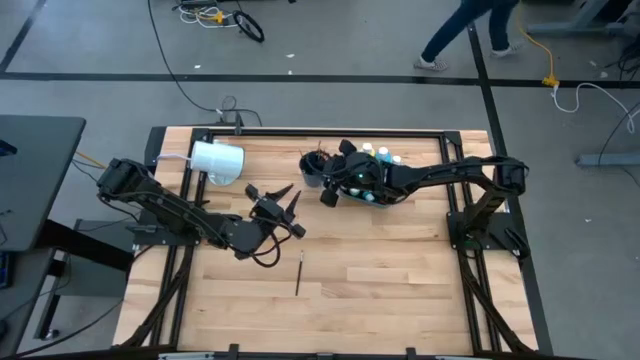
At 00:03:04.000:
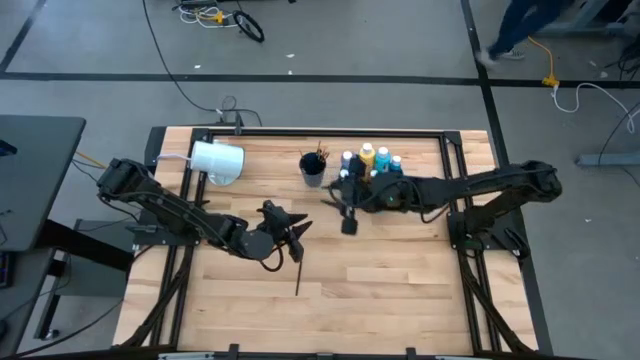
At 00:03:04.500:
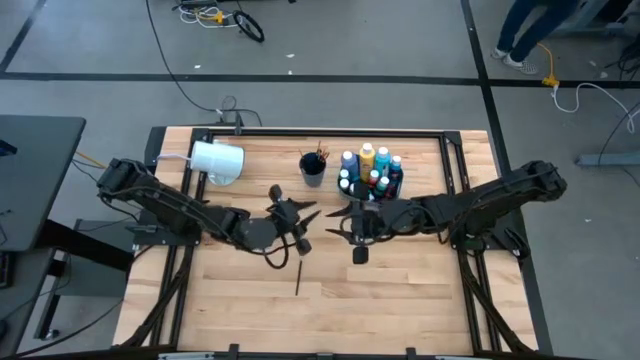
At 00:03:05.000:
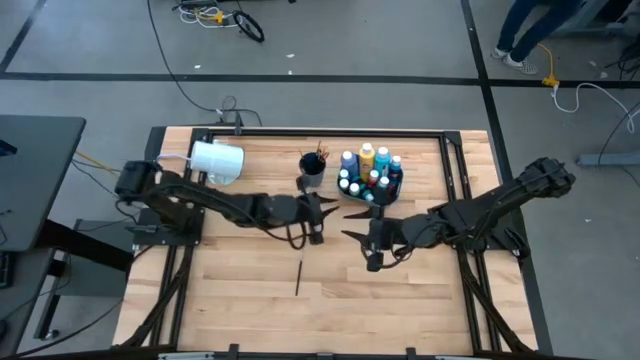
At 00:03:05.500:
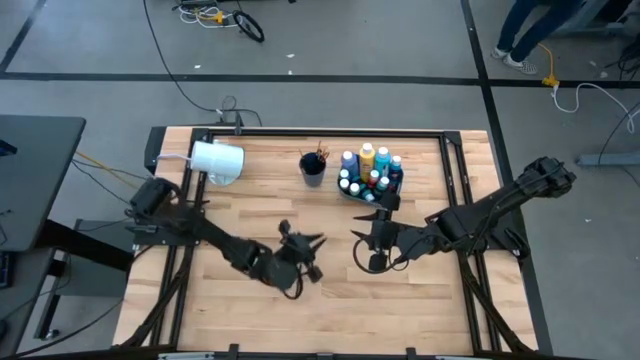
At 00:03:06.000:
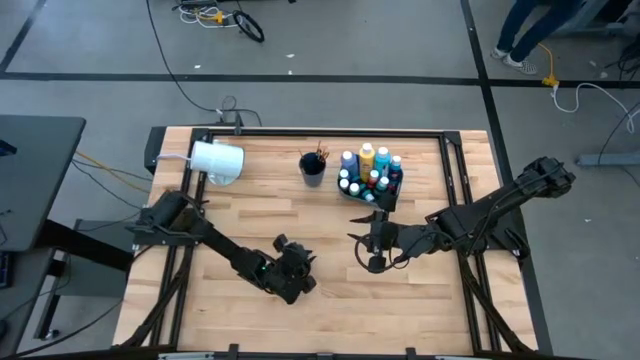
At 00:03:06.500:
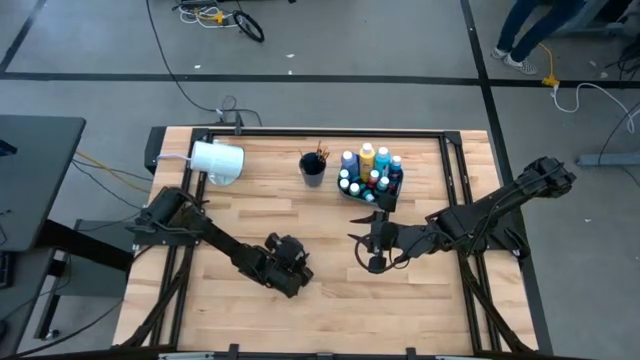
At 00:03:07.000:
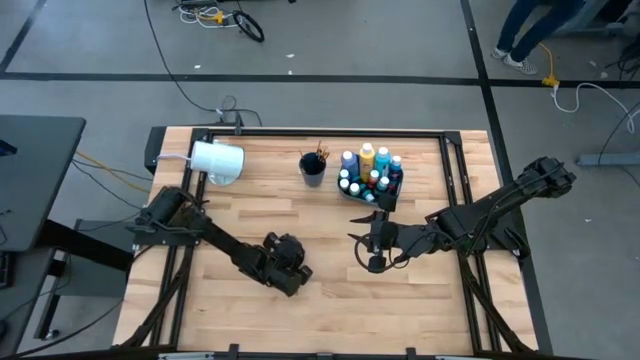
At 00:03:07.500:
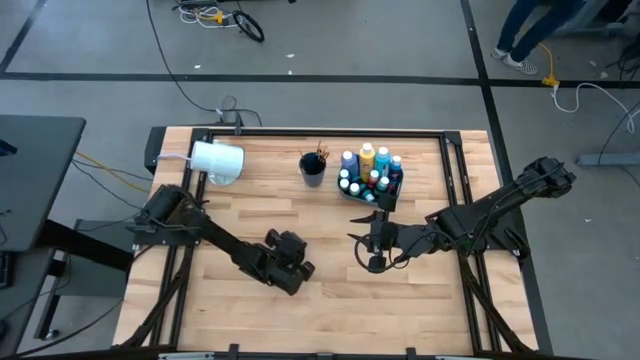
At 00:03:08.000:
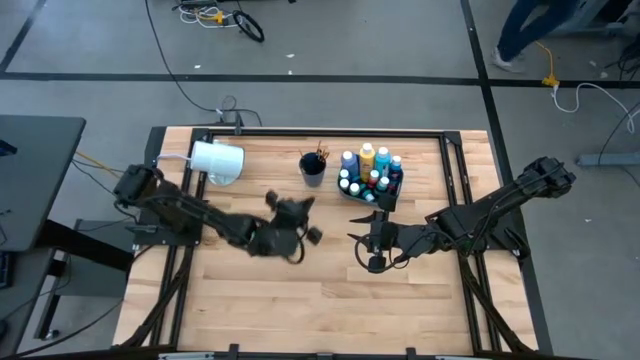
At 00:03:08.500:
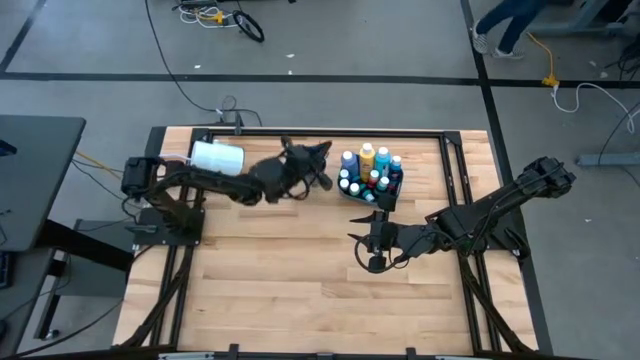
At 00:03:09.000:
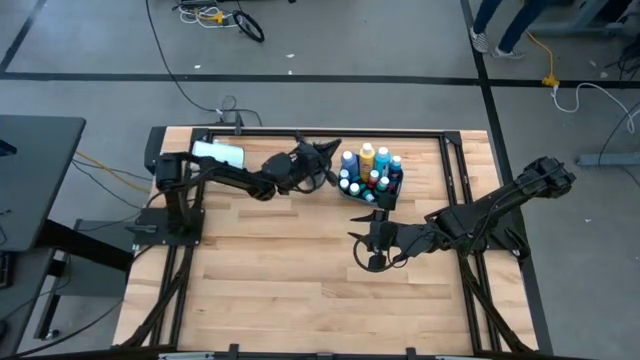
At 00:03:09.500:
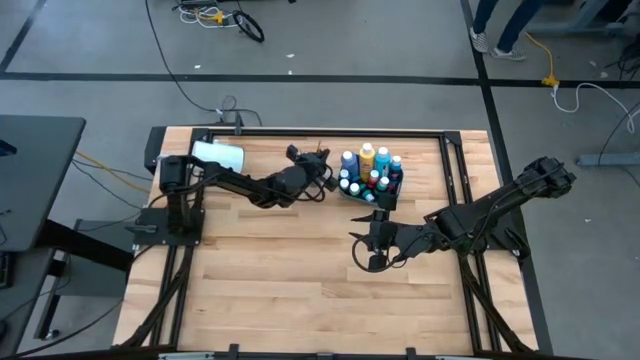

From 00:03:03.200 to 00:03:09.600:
Task: Pick & Place Paint Supplies
Put the silver paint brush into the blue cup

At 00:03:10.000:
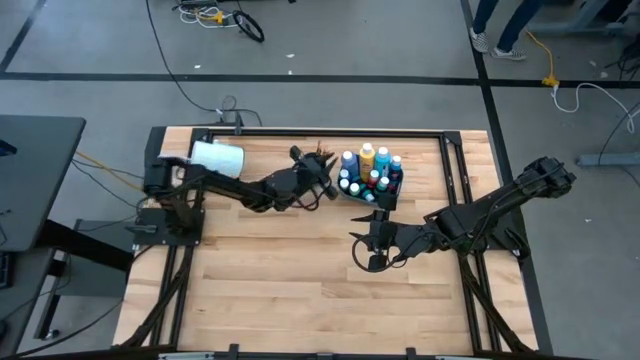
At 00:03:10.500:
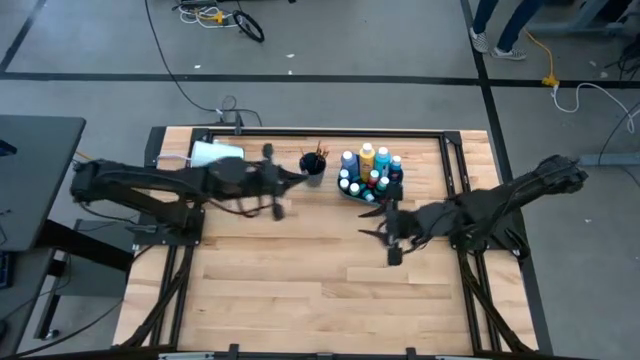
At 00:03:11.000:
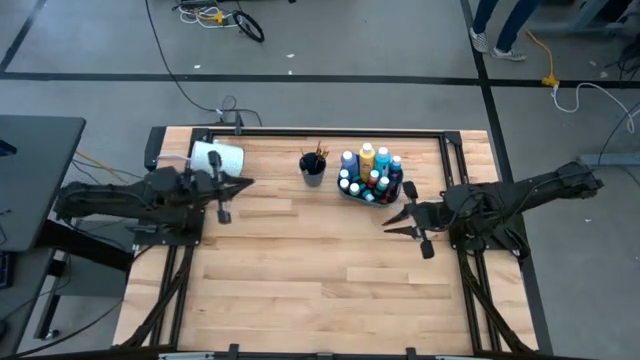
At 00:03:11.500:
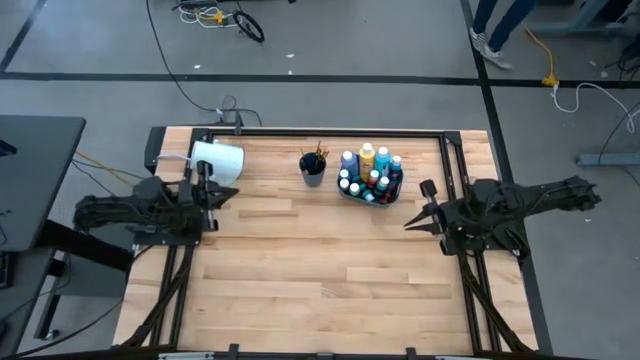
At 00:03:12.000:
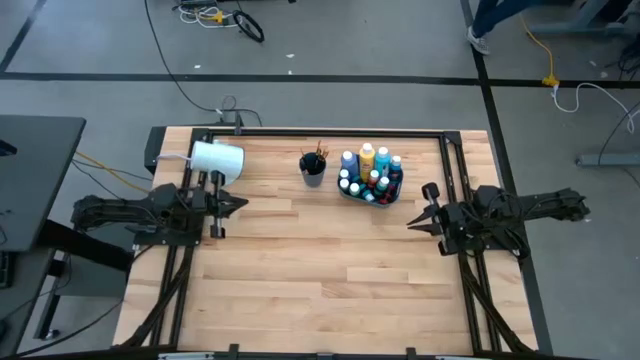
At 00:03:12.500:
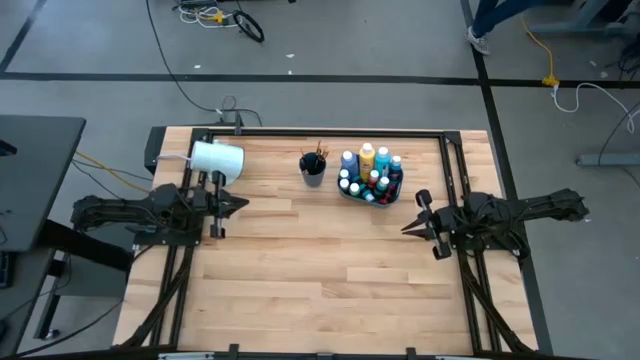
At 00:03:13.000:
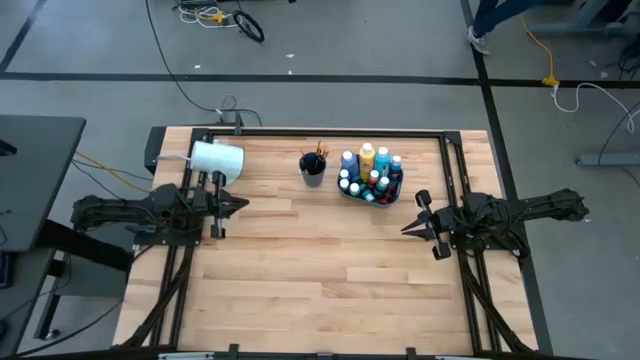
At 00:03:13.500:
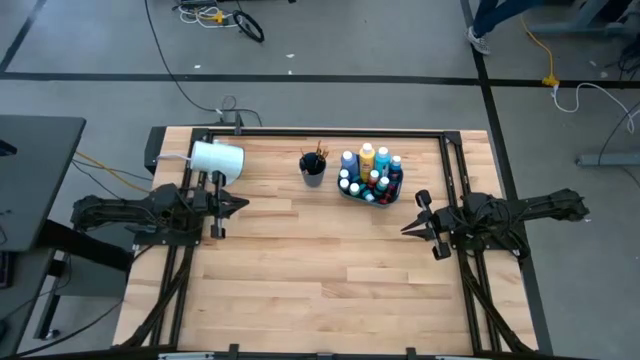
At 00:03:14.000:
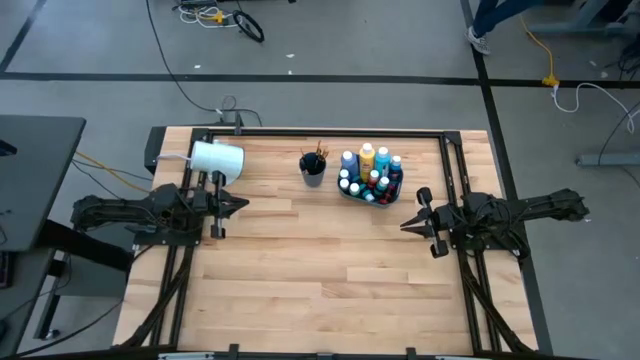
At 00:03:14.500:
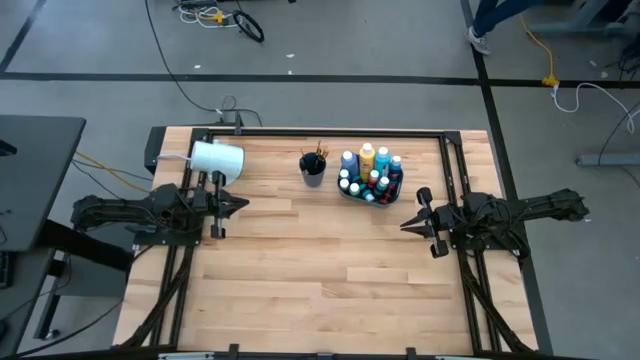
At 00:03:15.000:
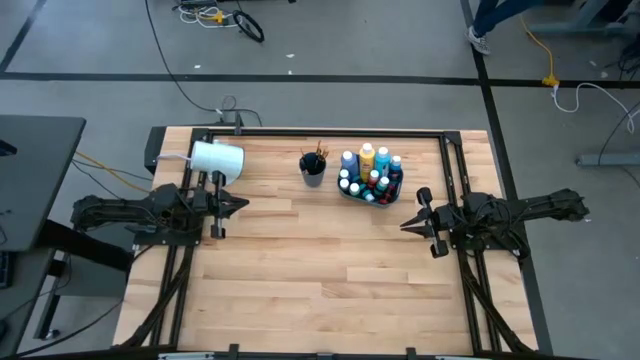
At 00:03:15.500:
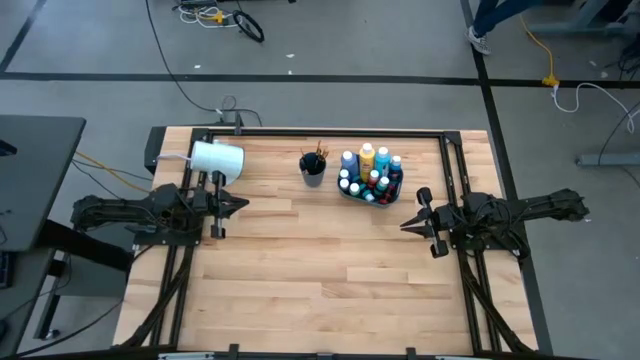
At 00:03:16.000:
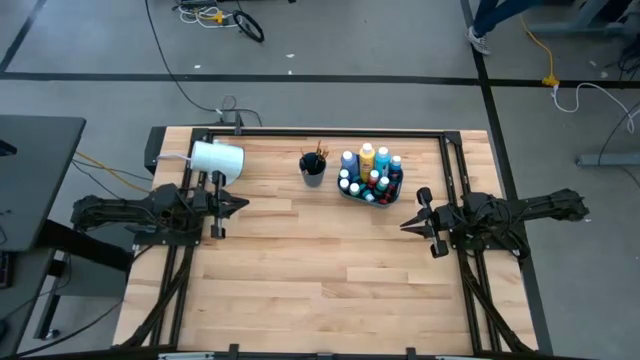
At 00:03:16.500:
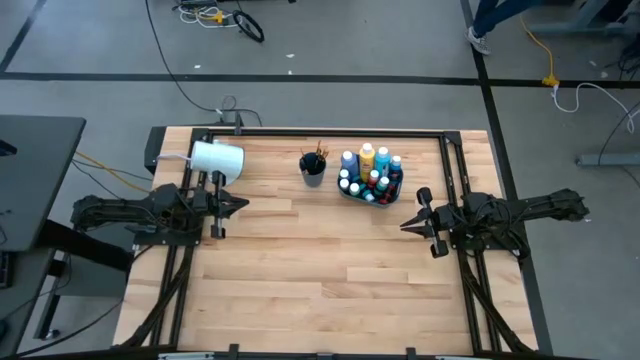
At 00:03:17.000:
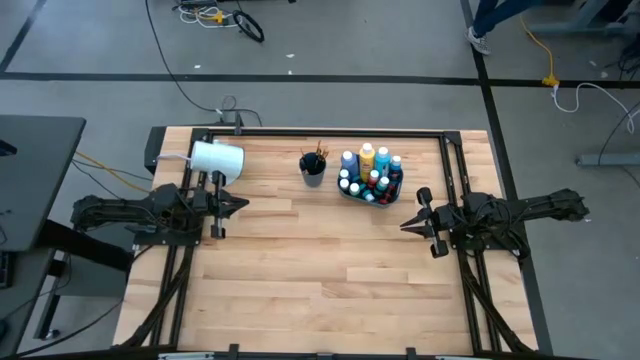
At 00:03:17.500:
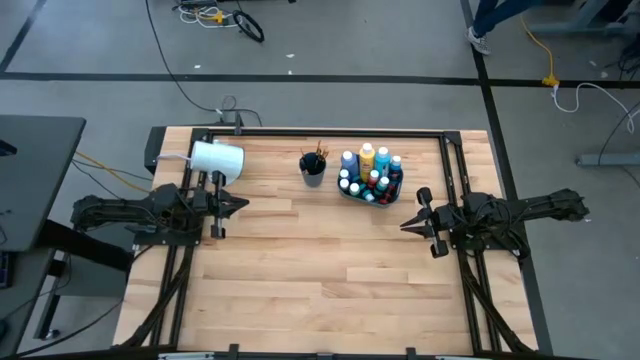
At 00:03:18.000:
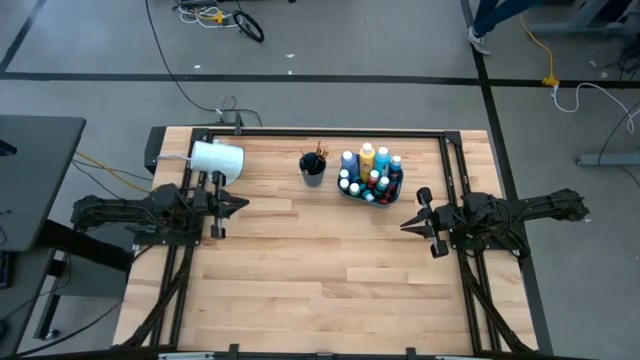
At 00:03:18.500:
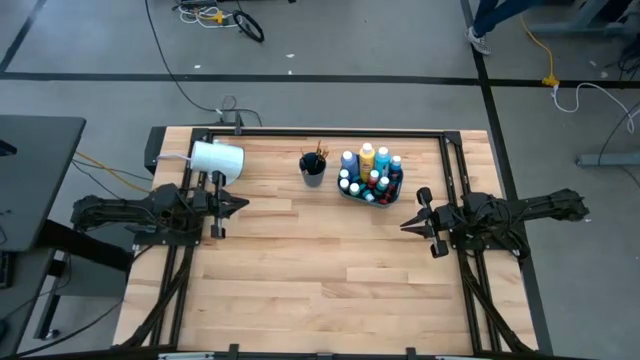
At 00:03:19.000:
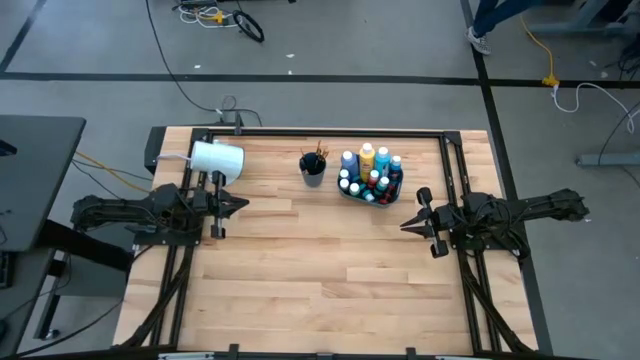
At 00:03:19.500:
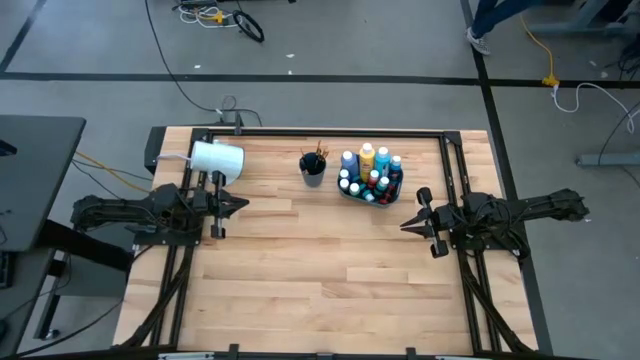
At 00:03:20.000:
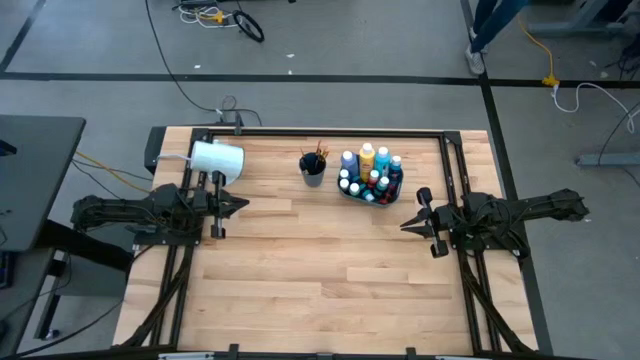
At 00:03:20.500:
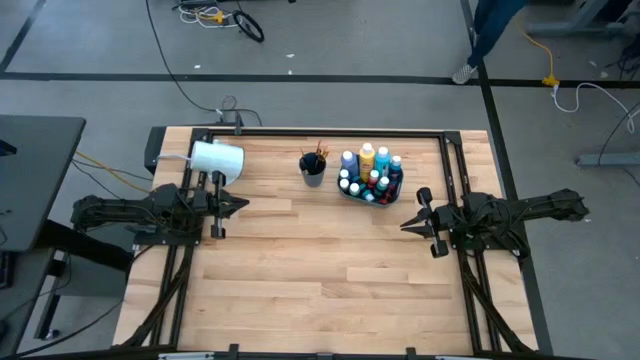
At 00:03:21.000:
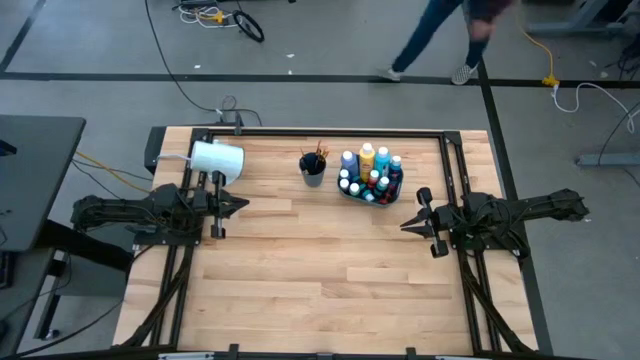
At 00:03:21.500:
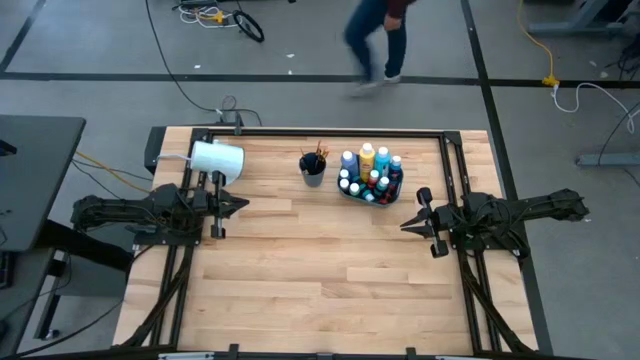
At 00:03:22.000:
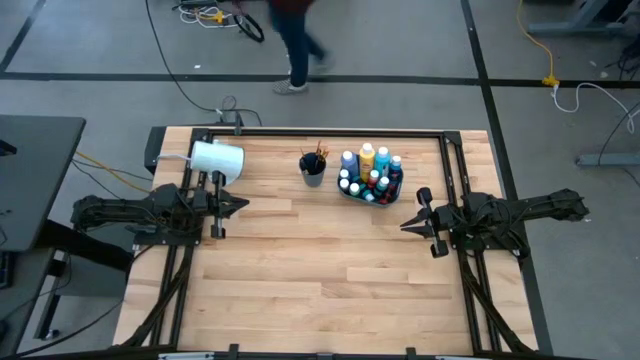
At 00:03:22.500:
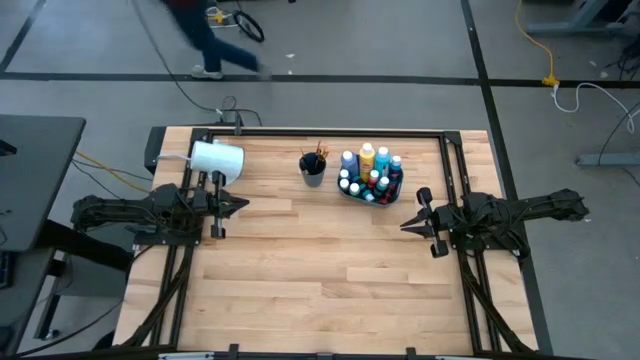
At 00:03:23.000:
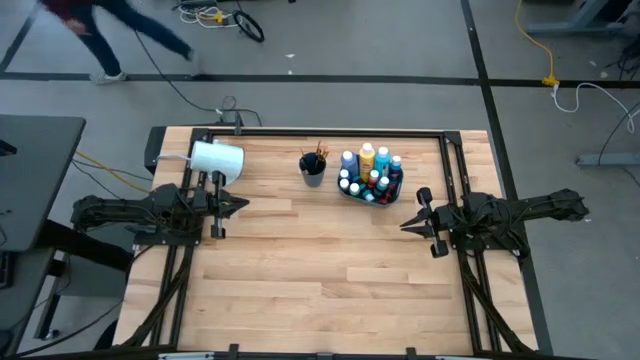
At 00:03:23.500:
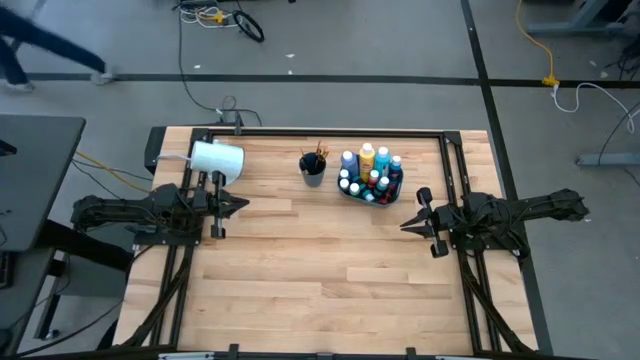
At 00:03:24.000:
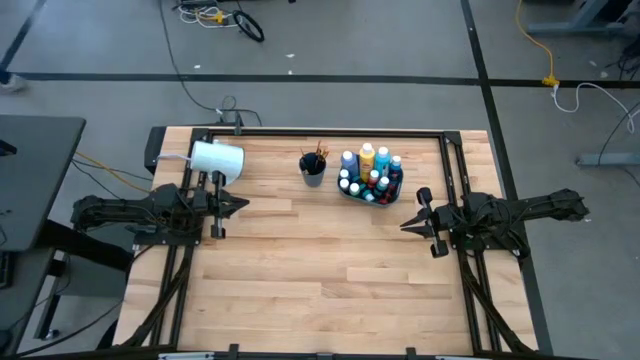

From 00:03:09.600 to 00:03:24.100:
Return to Home Position
